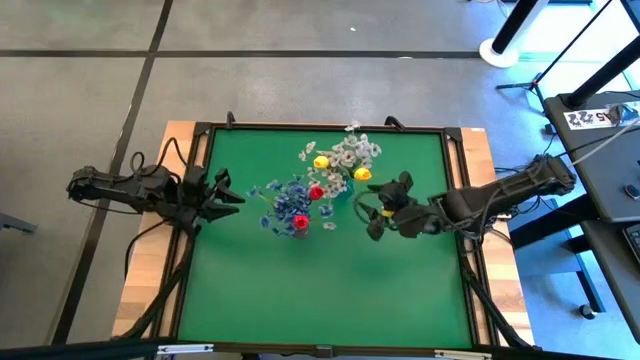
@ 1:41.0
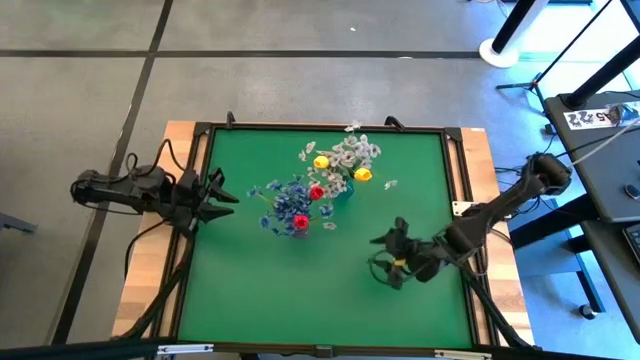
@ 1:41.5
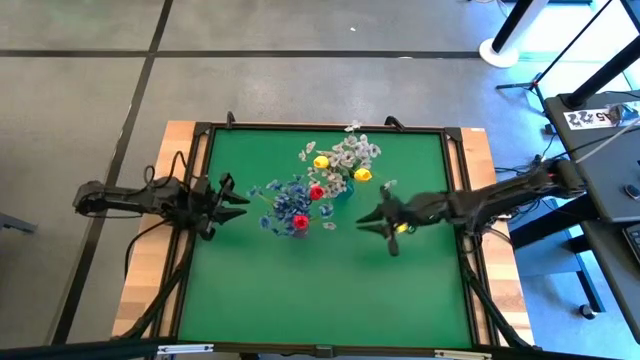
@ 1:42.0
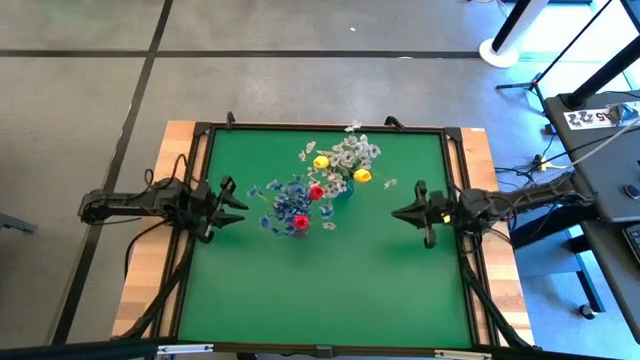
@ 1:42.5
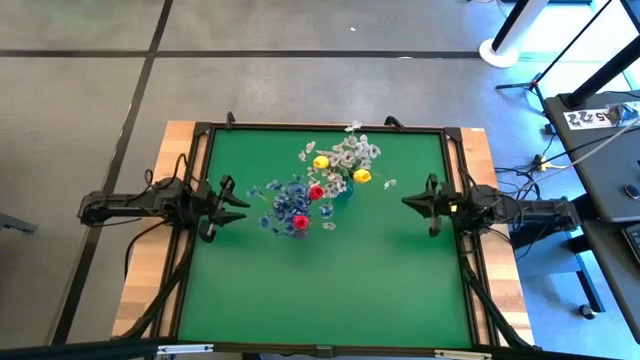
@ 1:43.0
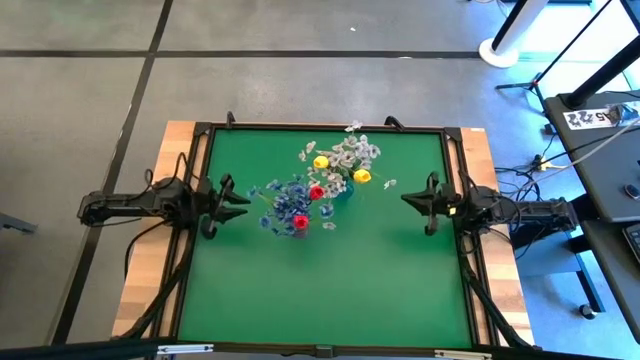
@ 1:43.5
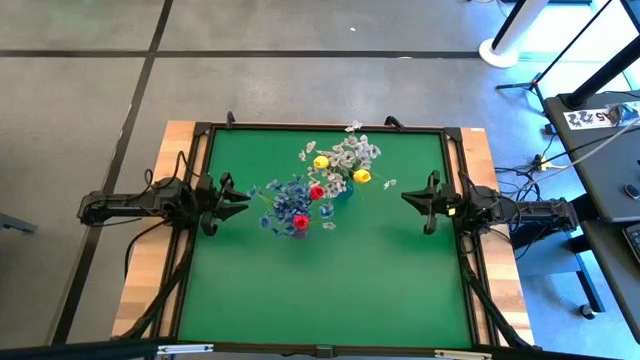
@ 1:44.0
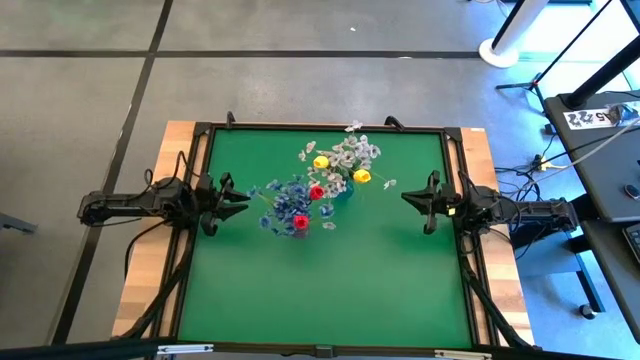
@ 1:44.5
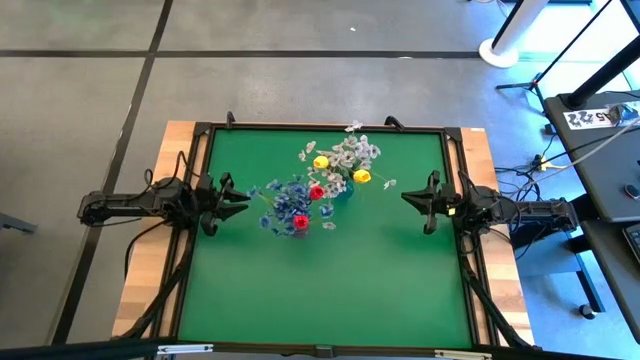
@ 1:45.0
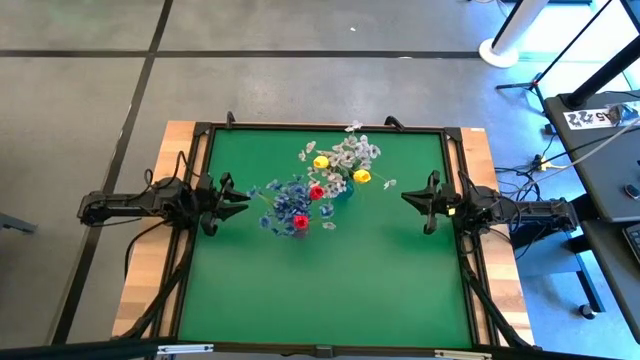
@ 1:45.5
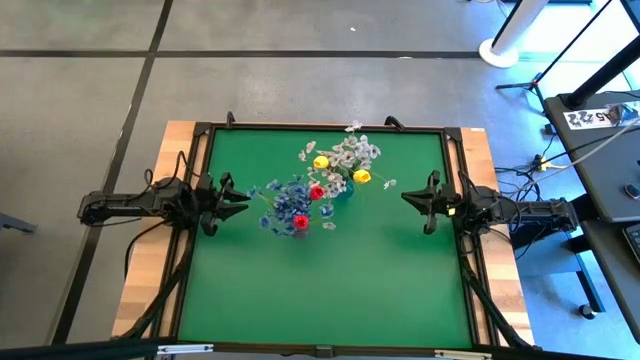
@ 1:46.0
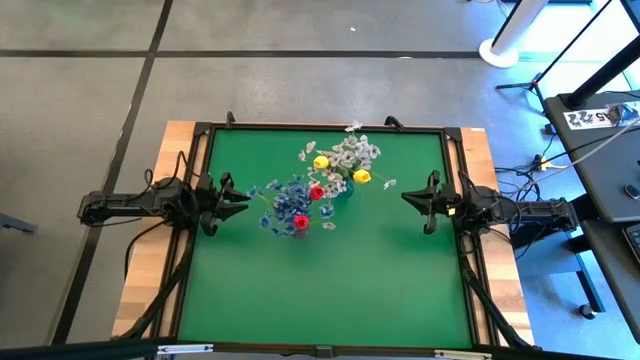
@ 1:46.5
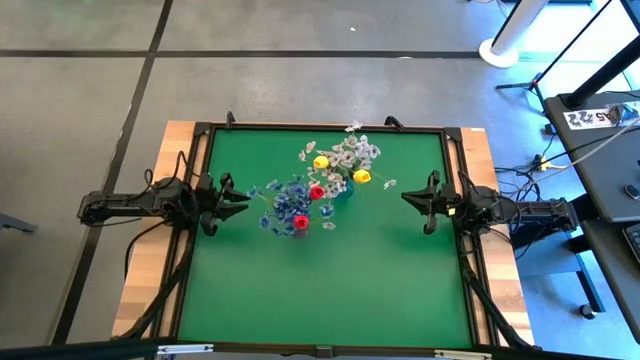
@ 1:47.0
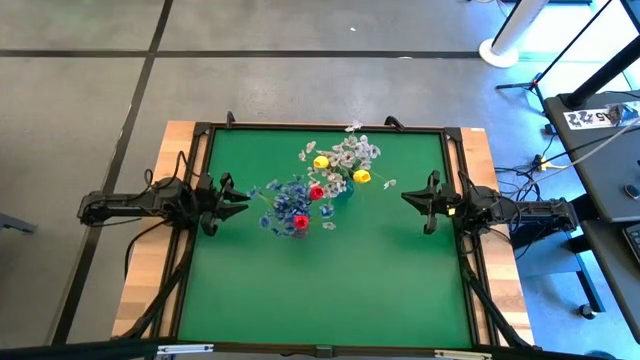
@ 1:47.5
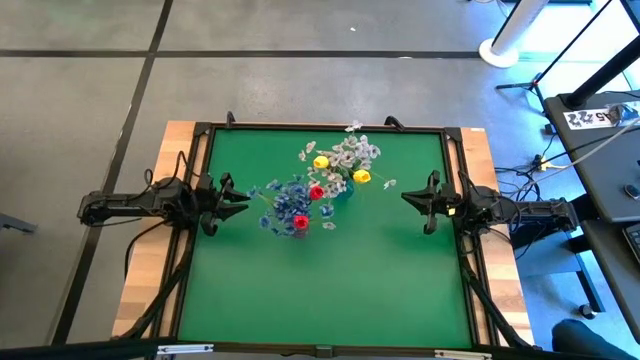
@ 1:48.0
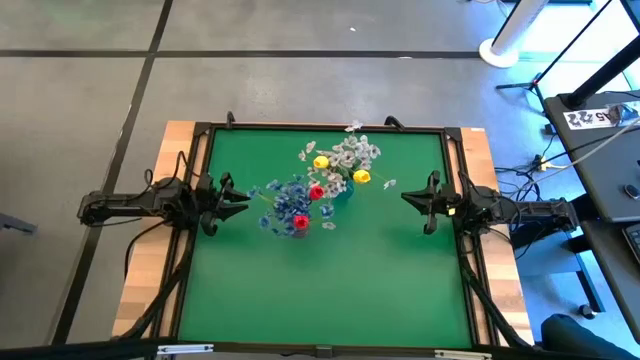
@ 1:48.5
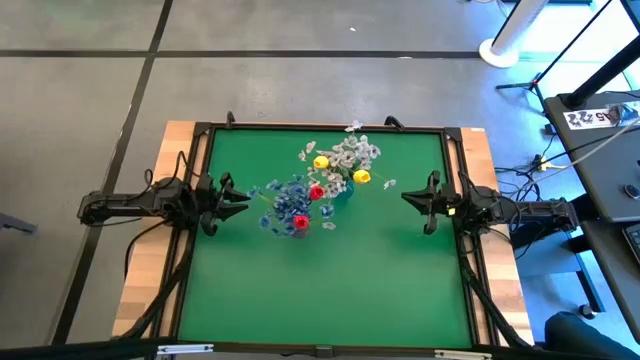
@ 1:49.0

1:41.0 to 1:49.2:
Task: Sort flowers into vase by color
Return to Home Position

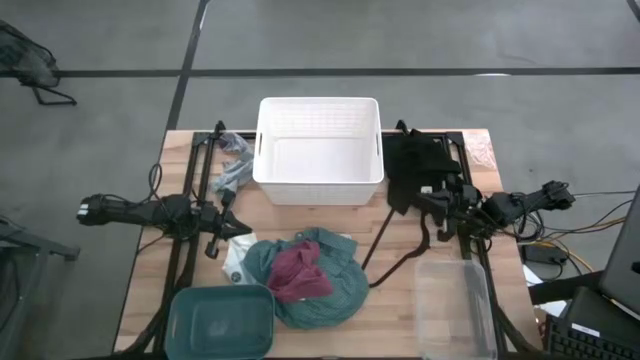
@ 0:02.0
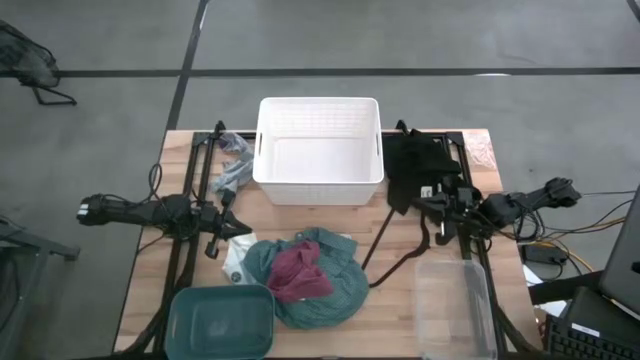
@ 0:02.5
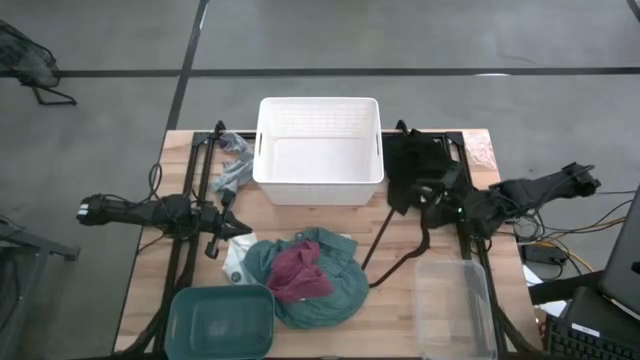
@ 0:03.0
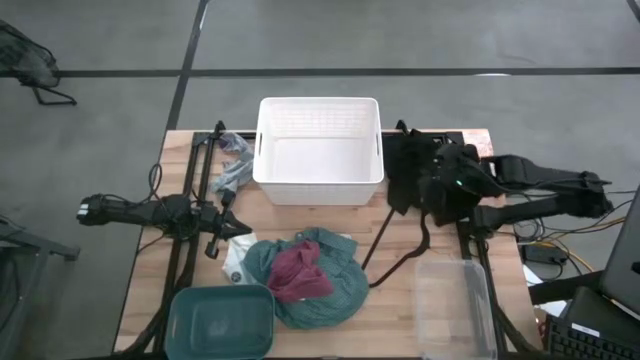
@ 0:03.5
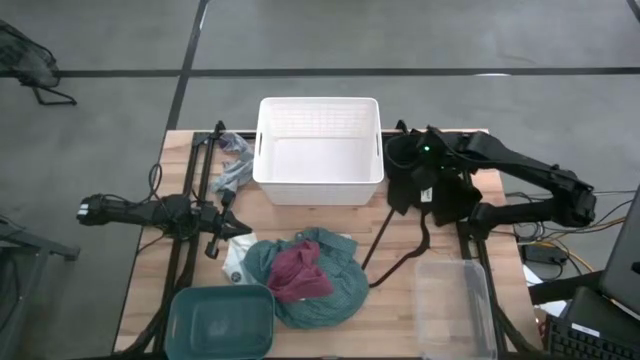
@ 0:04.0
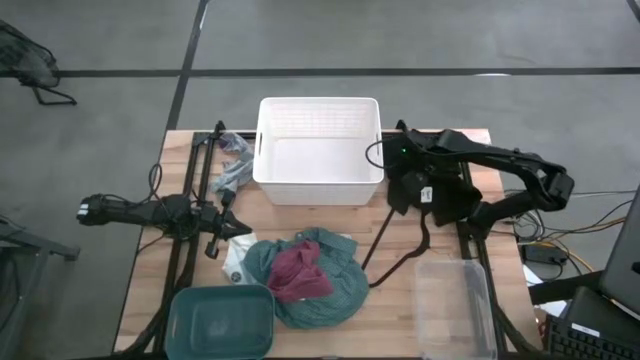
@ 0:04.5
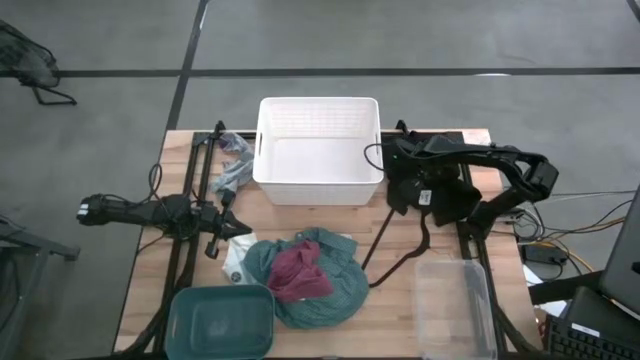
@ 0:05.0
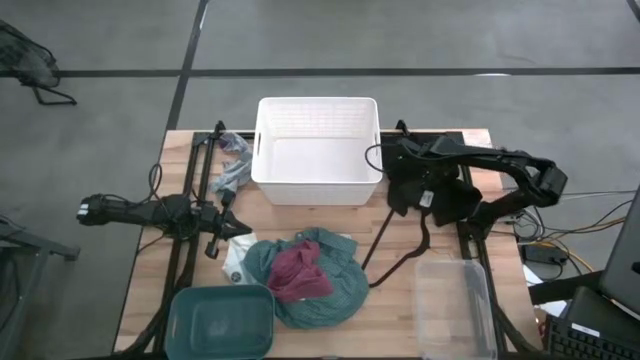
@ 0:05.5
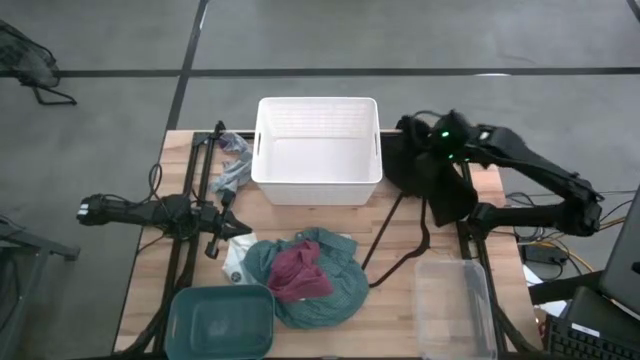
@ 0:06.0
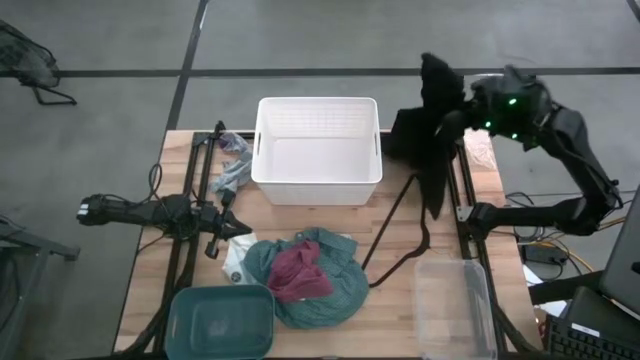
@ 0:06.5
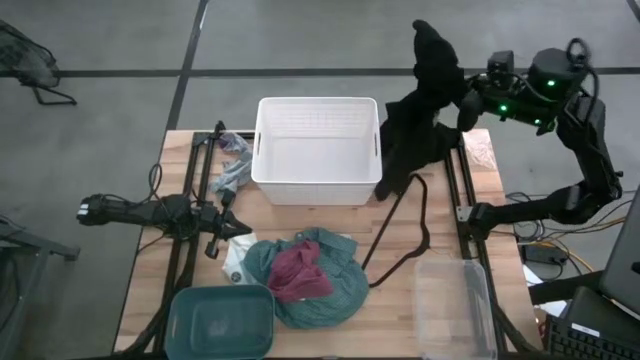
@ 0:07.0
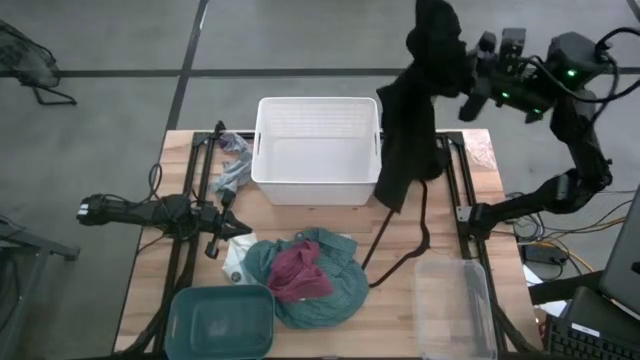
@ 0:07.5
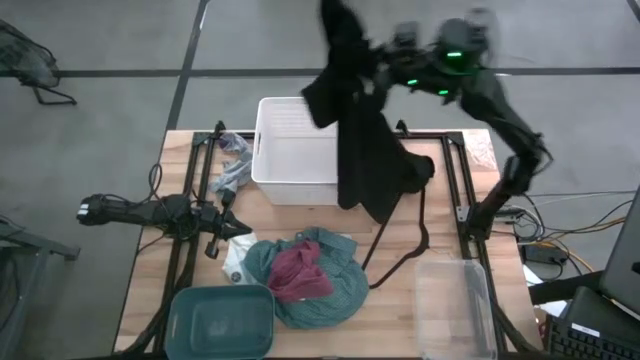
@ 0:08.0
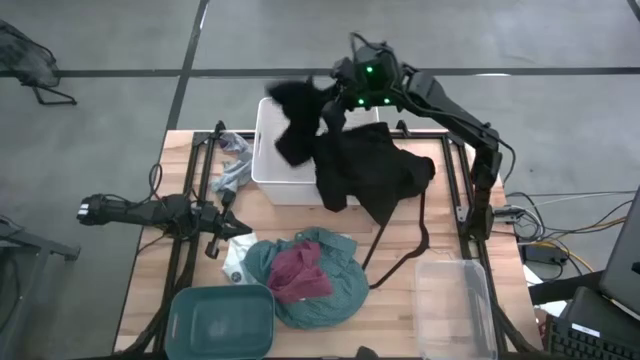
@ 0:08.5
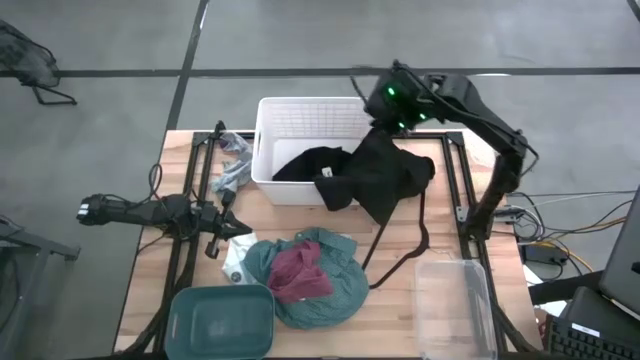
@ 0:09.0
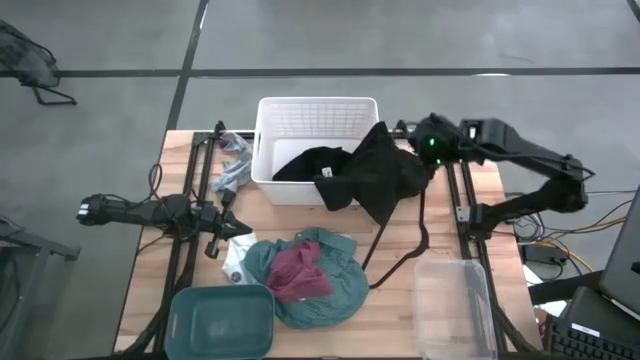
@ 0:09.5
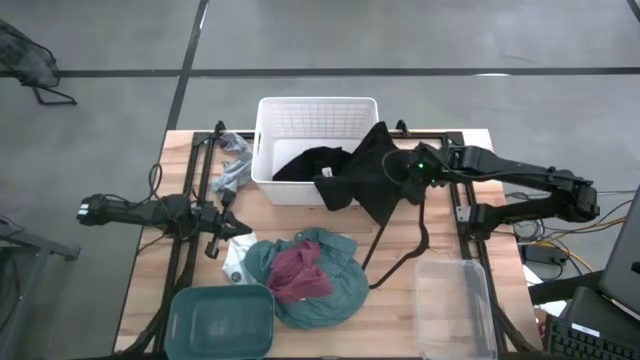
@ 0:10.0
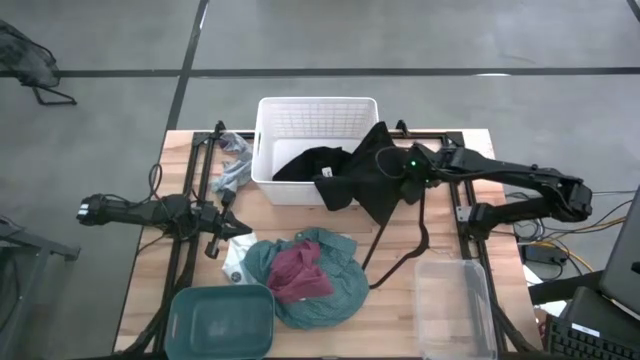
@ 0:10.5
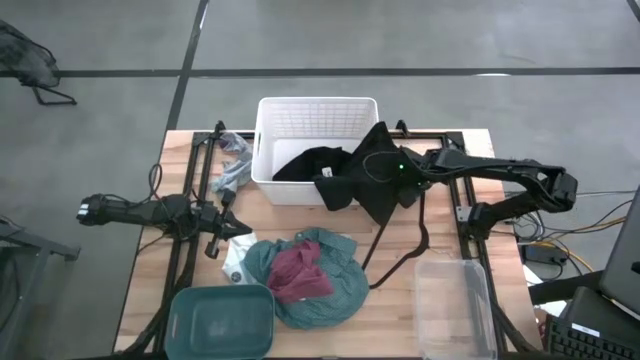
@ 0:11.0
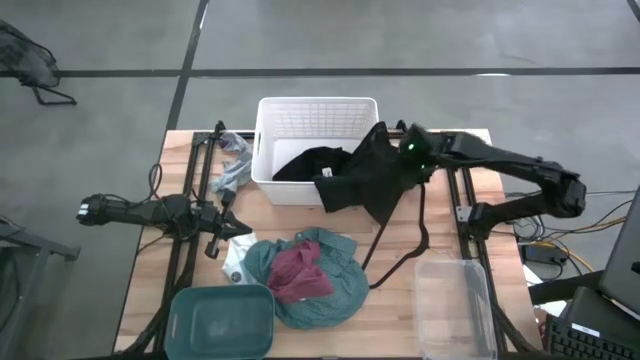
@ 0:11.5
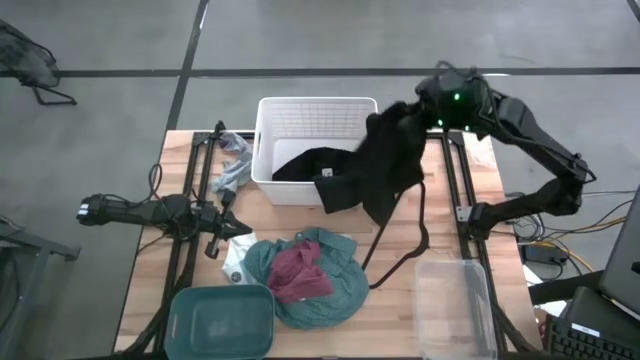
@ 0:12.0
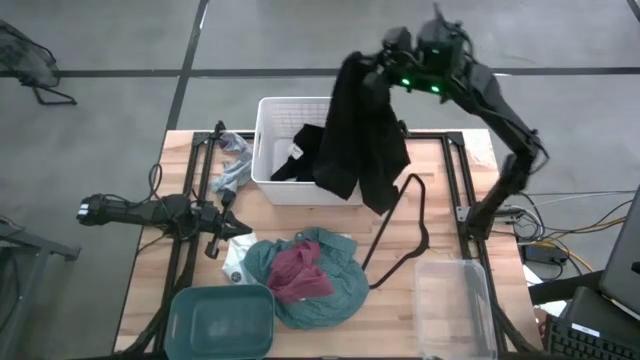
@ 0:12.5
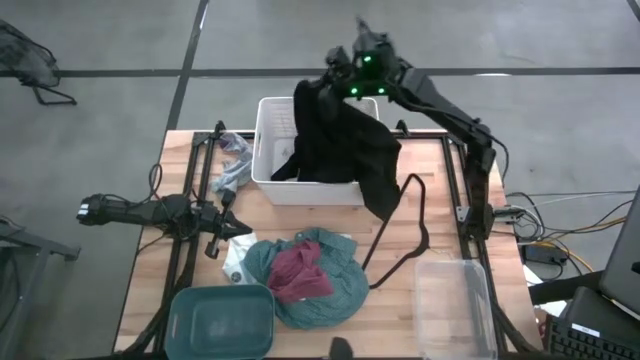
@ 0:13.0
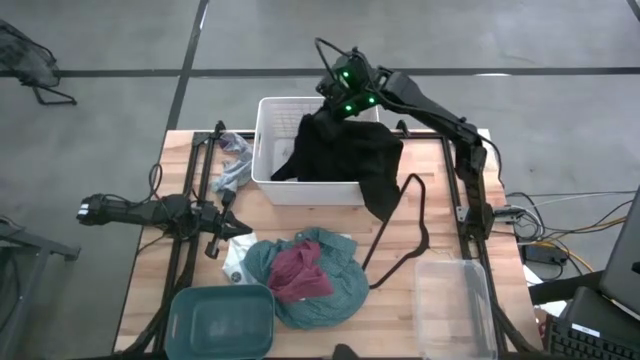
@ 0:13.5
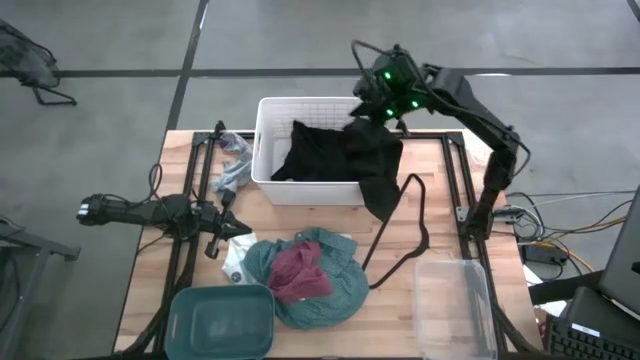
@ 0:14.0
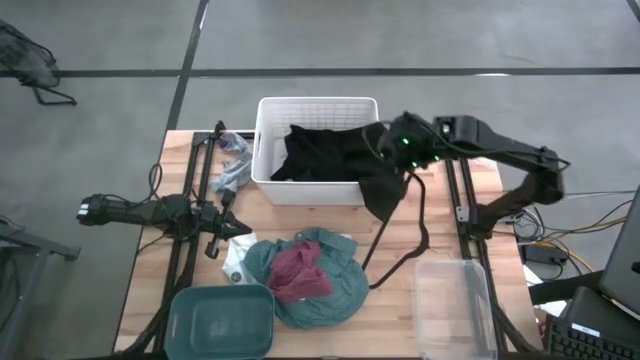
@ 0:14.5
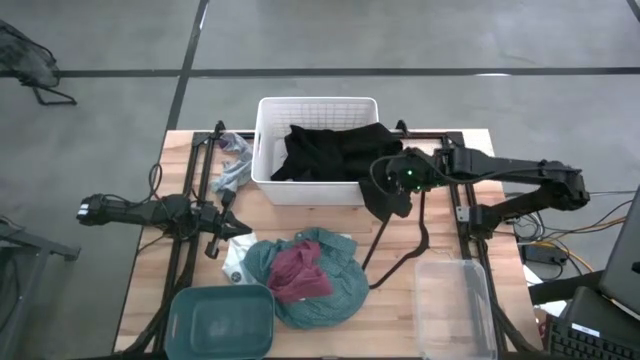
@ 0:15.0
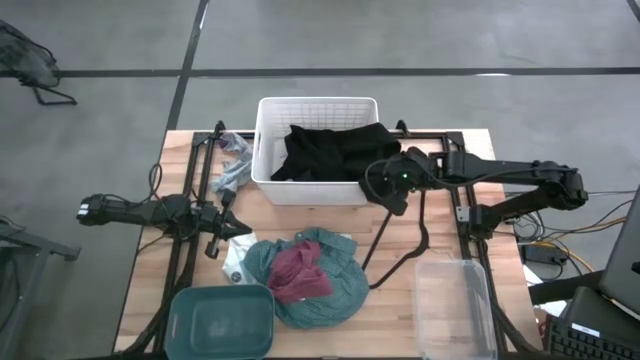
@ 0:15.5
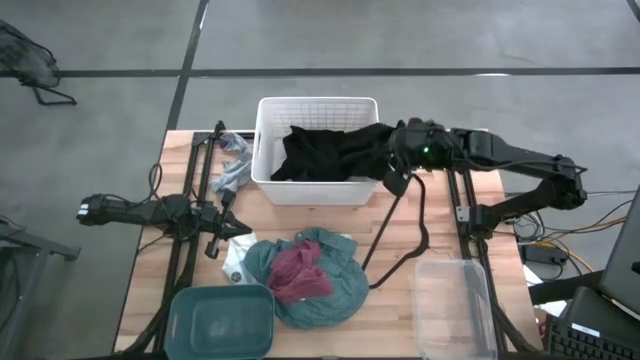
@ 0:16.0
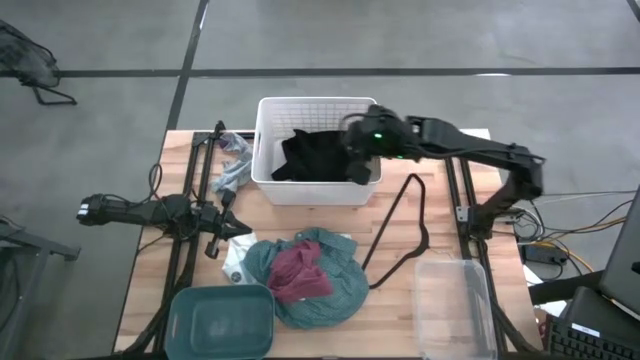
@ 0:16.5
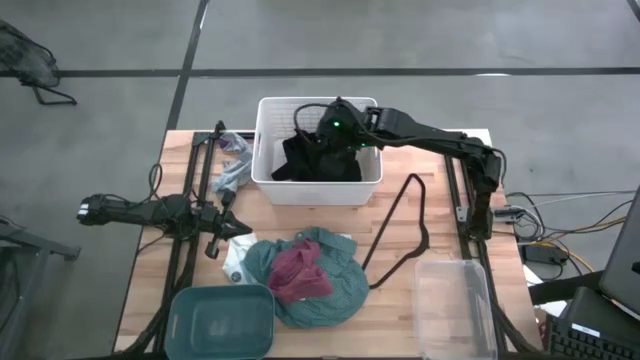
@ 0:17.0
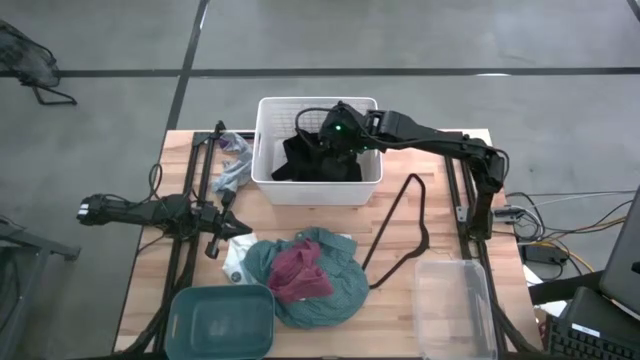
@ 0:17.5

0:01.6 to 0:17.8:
Task: Pick & Place Cloths
Put the black shirt into the white bin
